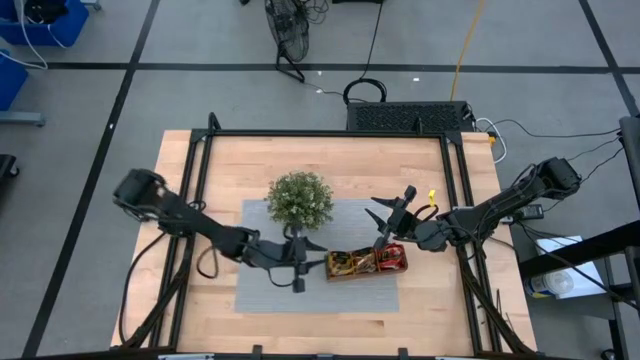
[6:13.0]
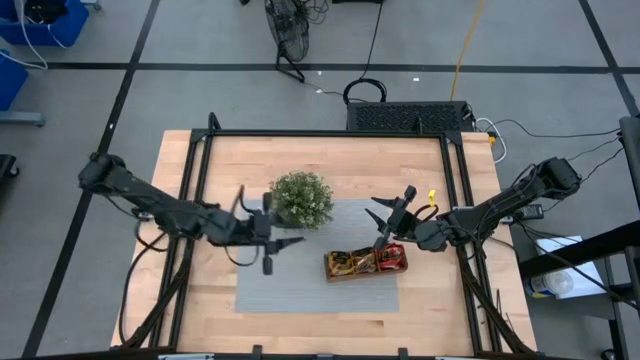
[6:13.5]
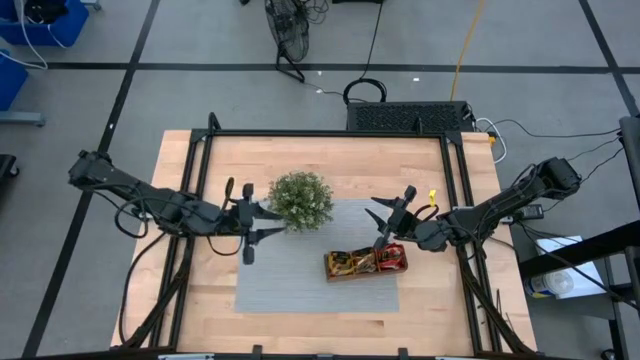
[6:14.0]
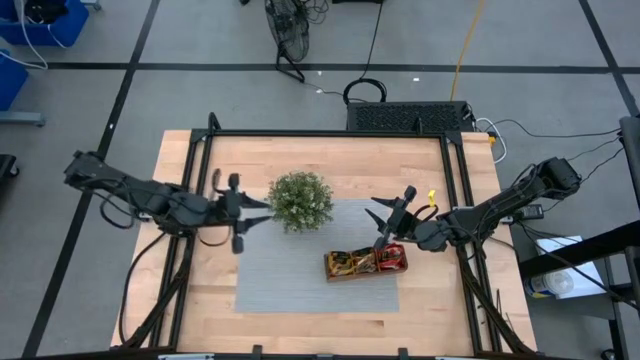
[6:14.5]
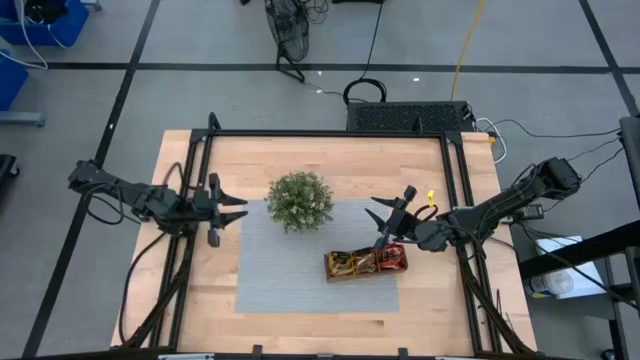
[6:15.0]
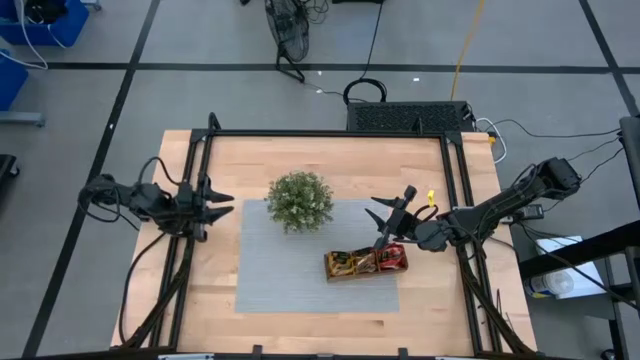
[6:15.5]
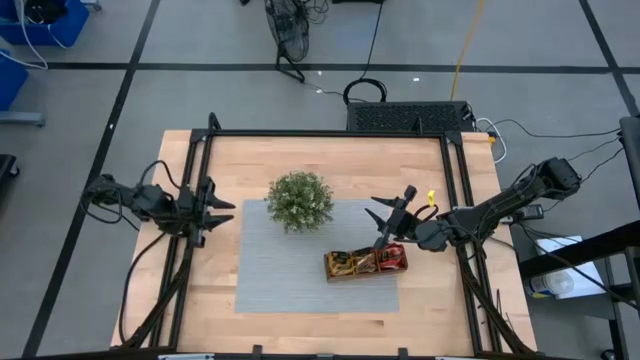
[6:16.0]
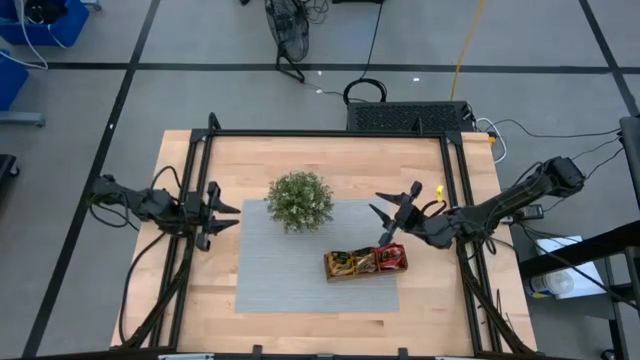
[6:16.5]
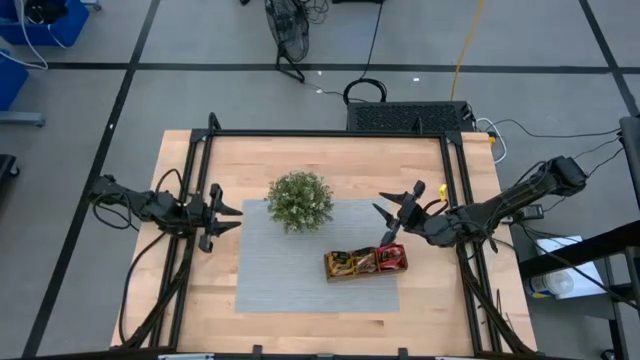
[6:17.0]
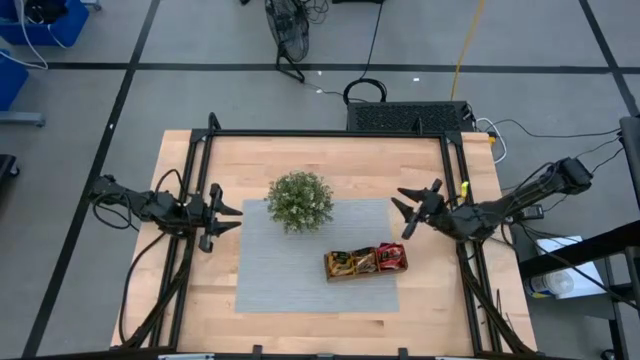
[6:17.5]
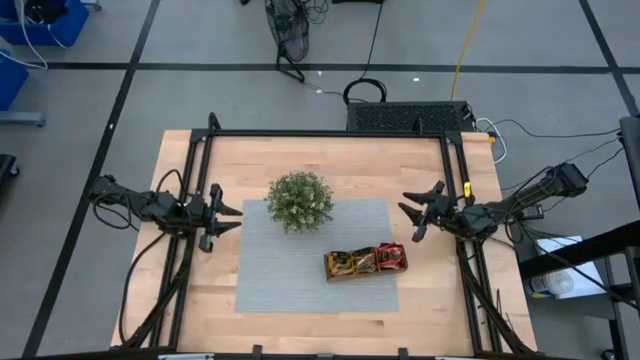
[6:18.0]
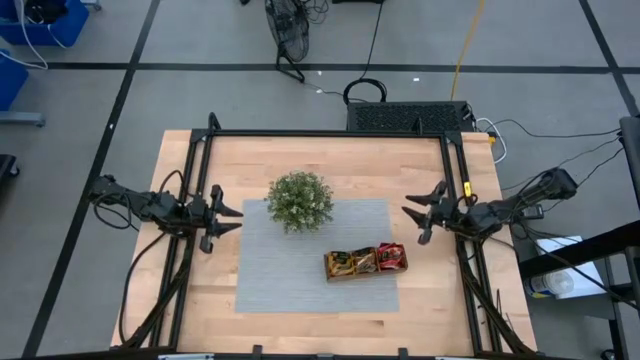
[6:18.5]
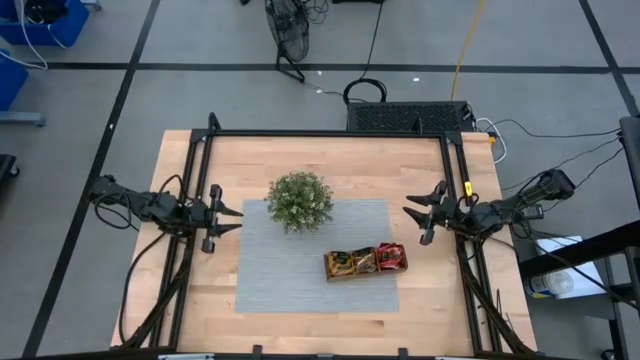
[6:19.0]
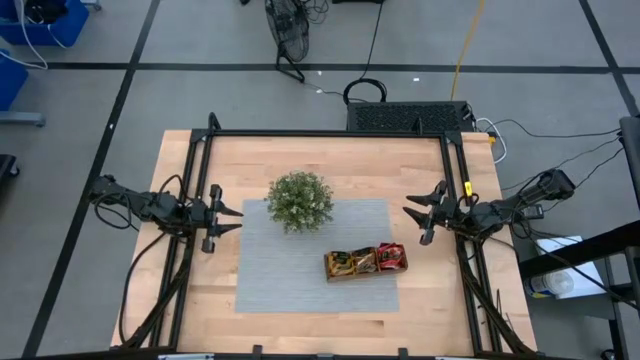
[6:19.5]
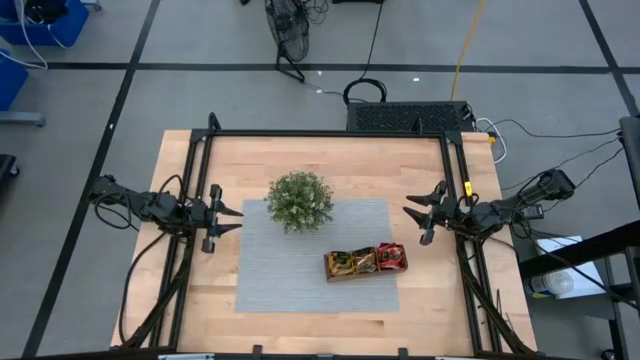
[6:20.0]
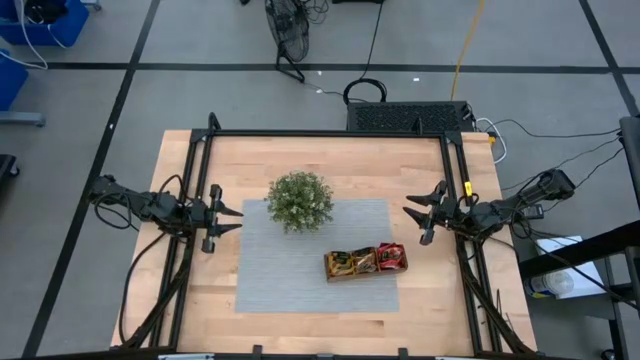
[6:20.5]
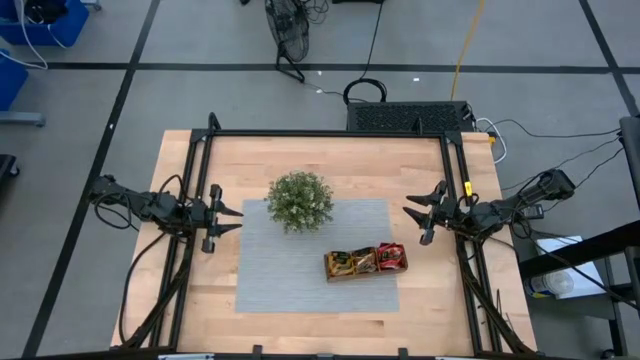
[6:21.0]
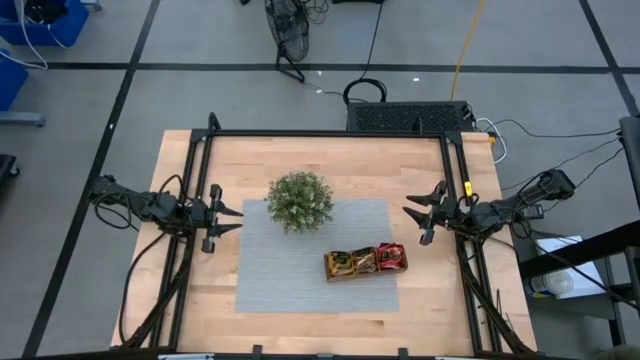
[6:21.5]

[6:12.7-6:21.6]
Task: Pick & Place Tea
Return to Home Position

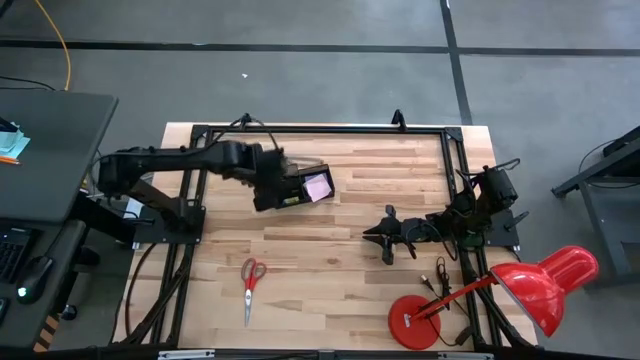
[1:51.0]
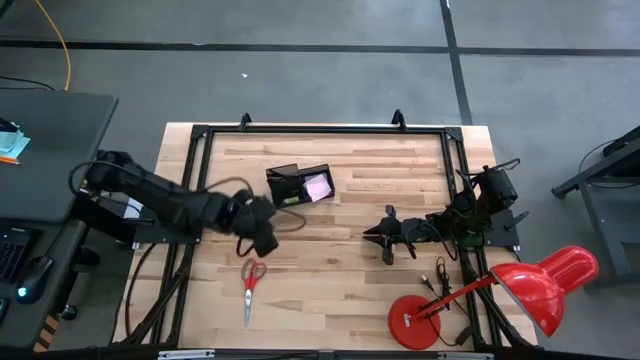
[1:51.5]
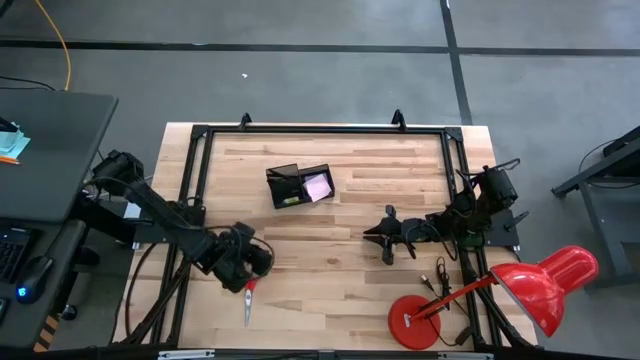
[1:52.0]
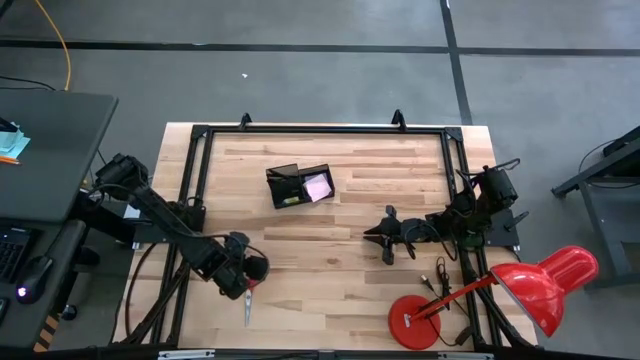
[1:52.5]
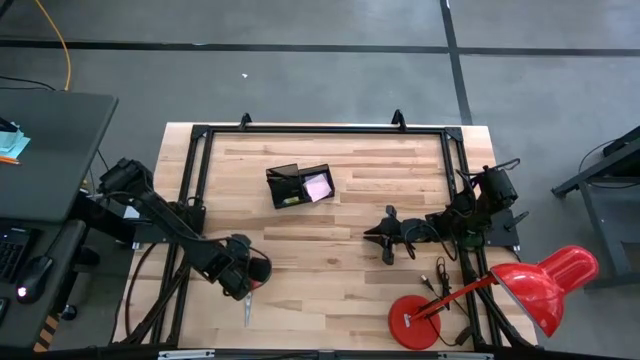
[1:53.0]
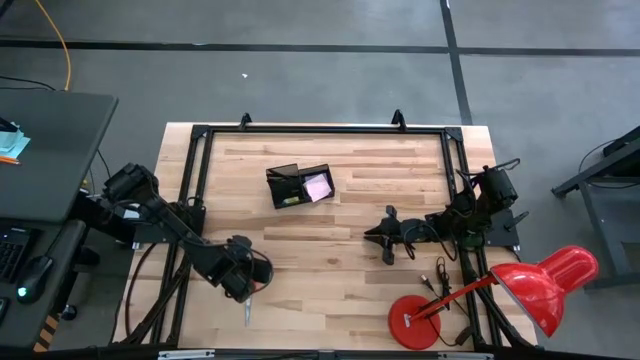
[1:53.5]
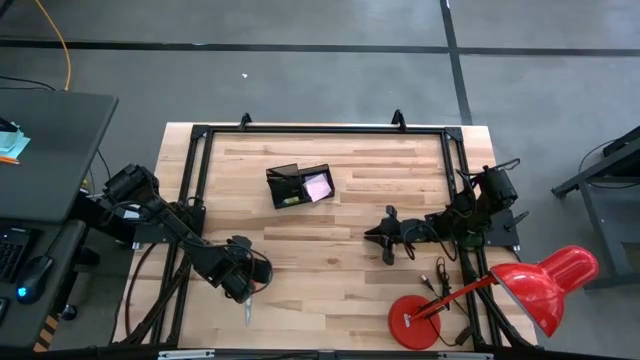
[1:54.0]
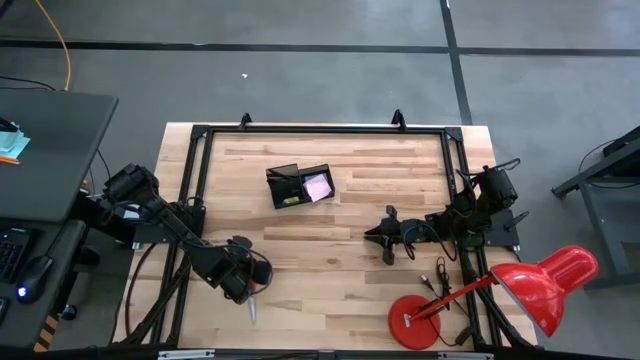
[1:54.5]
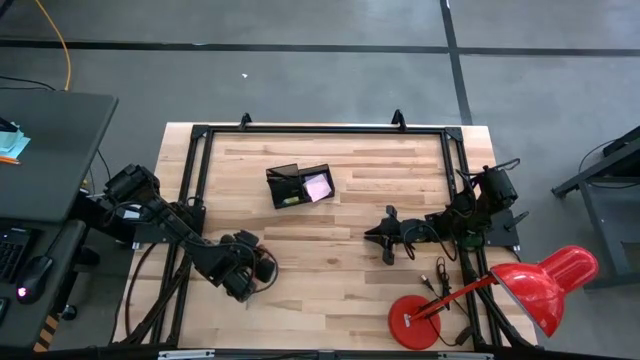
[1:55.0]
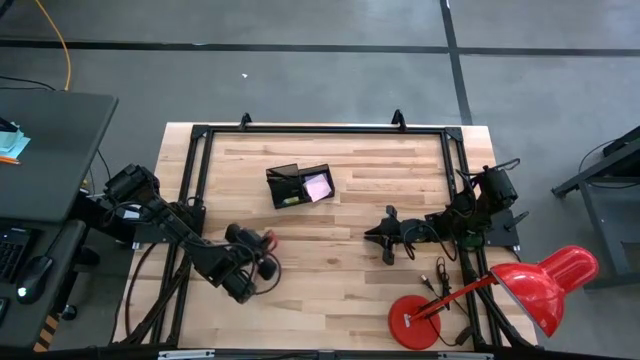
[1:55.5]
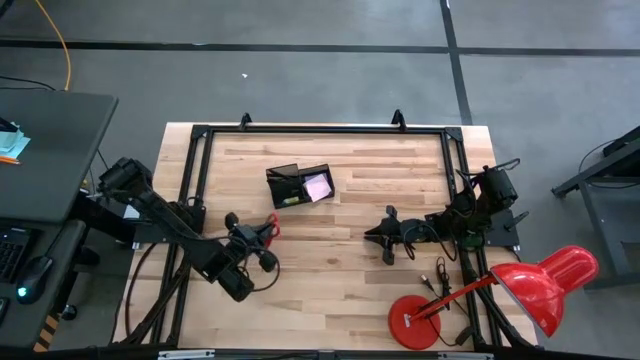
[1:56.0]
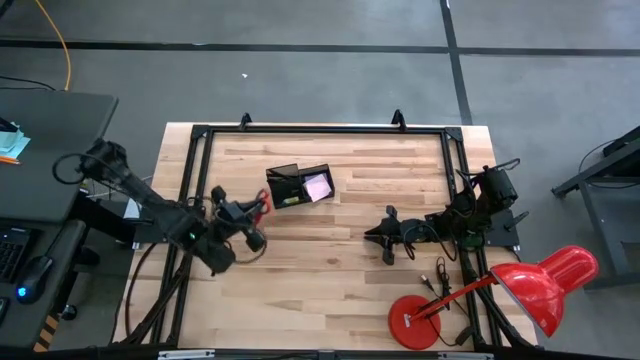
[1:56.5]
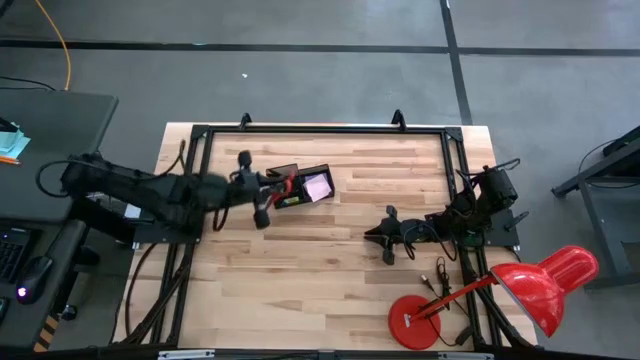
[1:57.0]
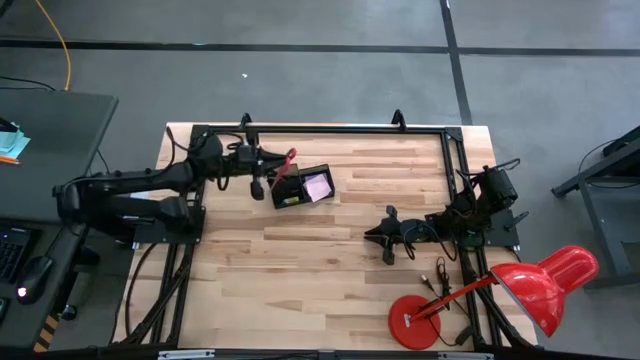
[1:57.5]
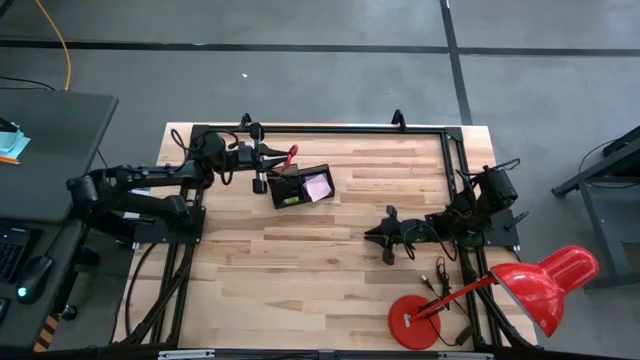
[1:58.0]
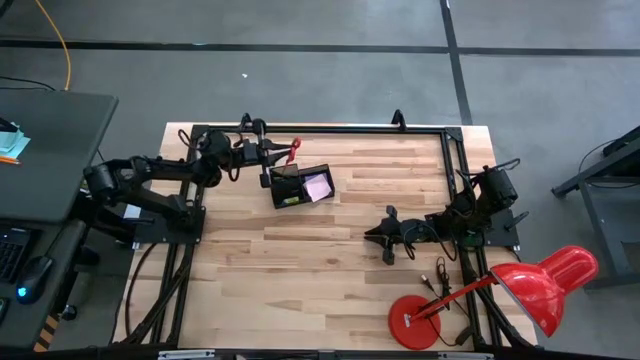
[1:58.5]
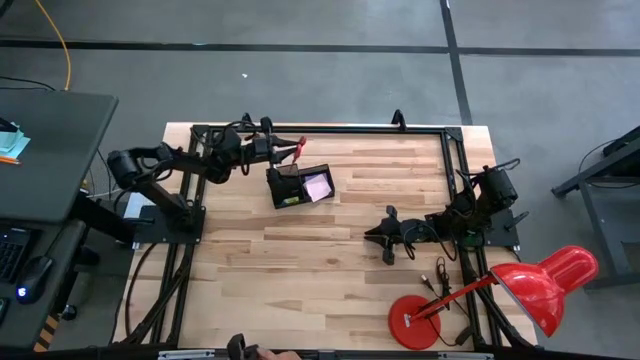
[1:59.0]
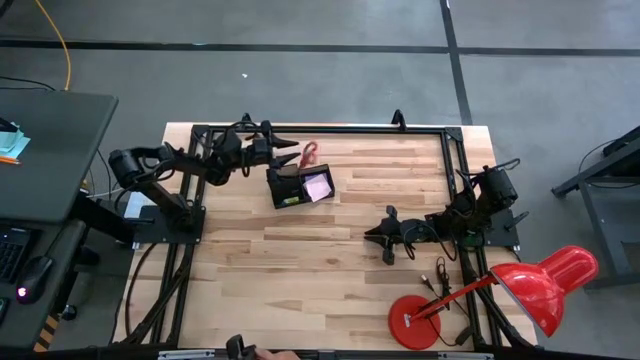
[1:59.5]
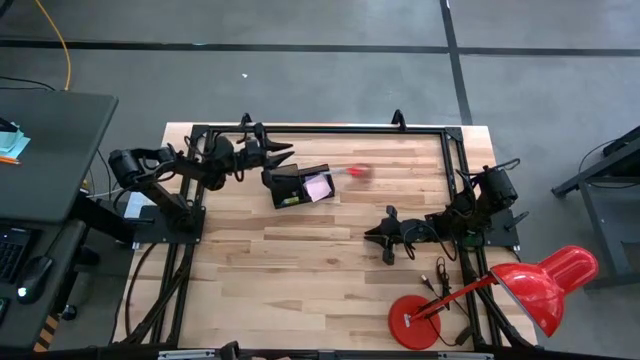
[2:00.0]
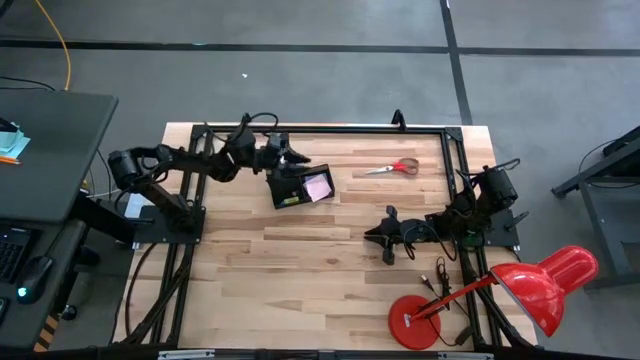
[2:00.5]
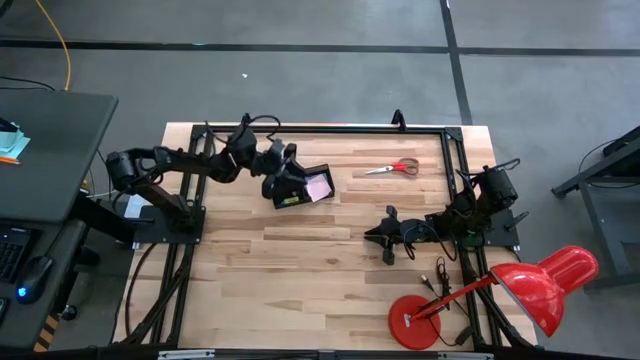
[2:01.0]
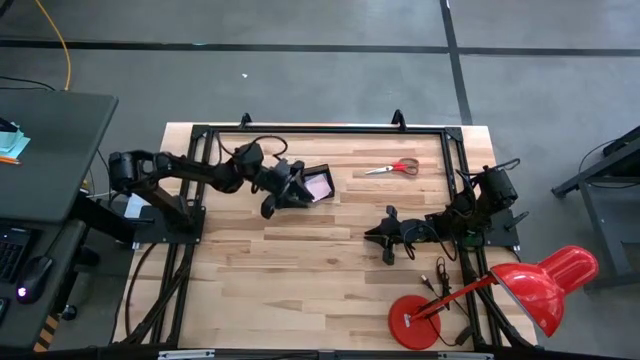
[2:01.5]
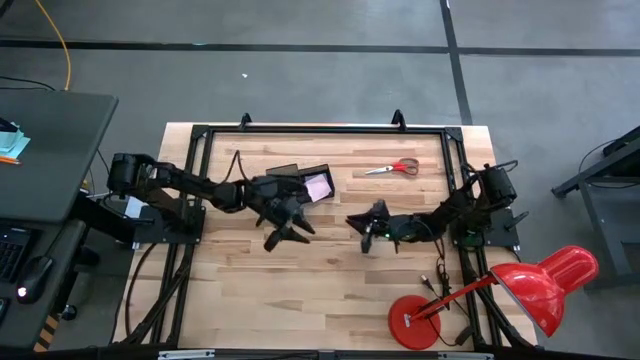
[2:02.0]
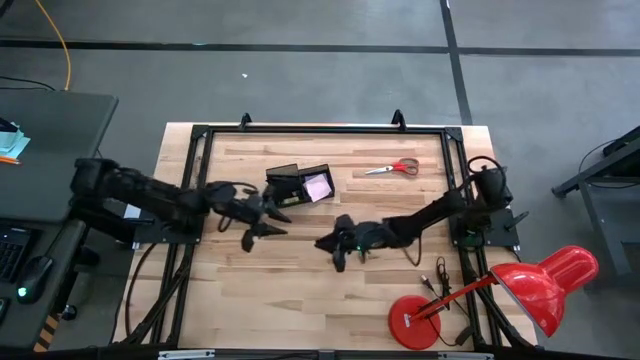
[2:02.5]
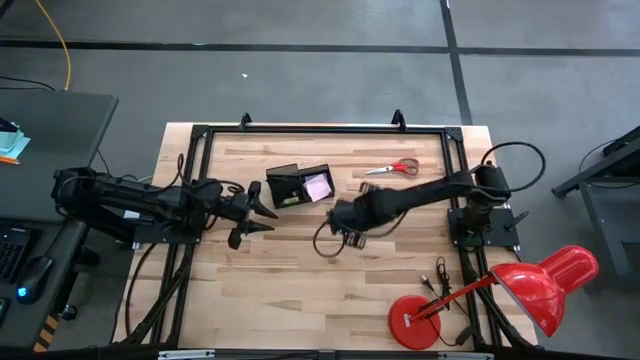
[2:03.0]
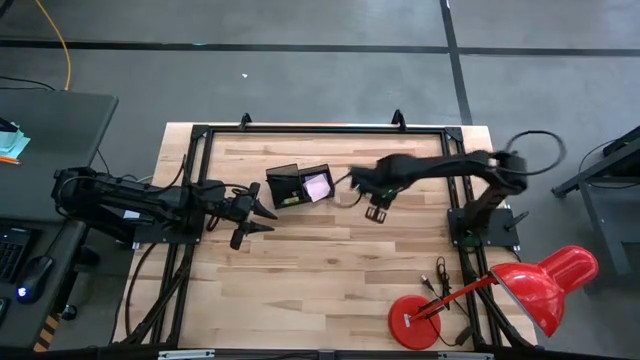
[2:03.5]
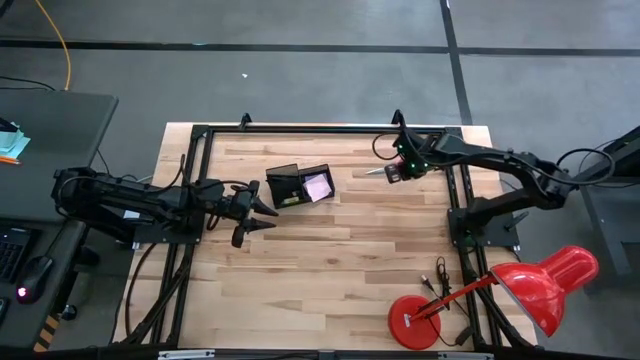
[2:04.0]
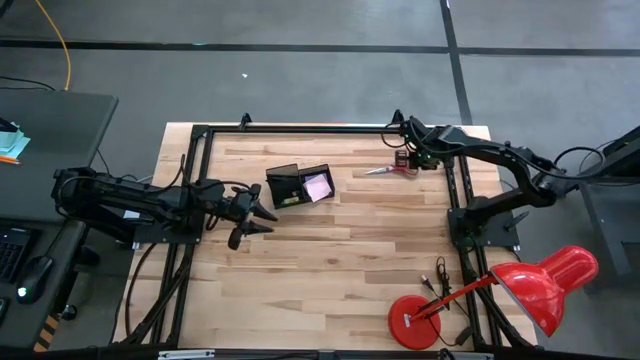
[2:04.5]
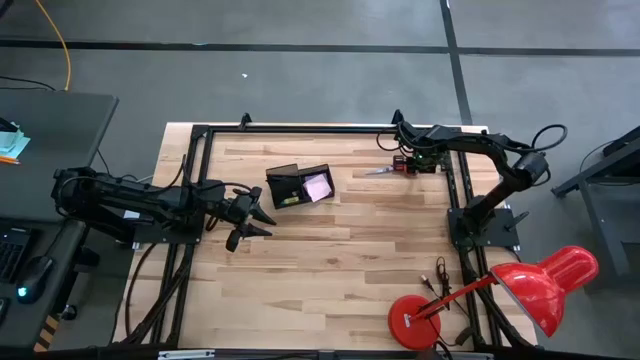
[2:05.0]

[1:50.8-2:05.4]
Task: Pick and place office supplies into organizer
Put the red scissors into the black desk organizer
